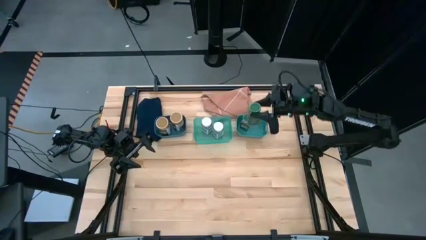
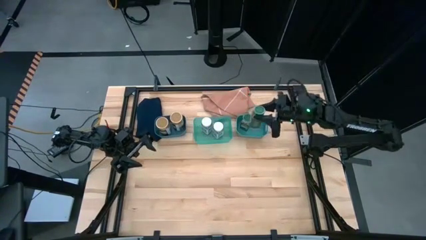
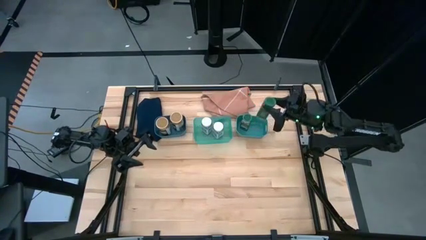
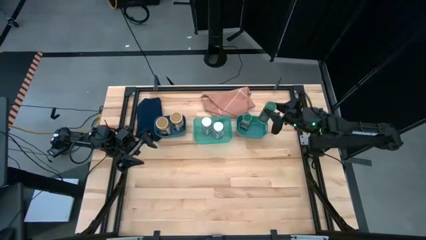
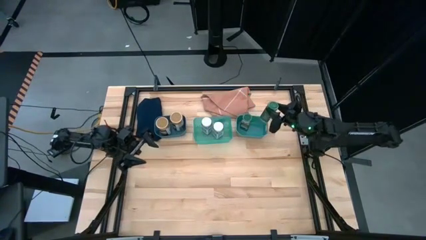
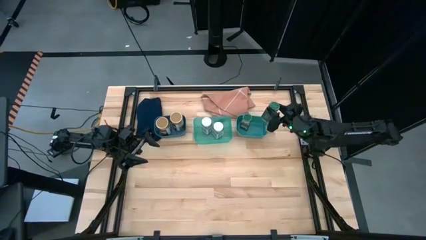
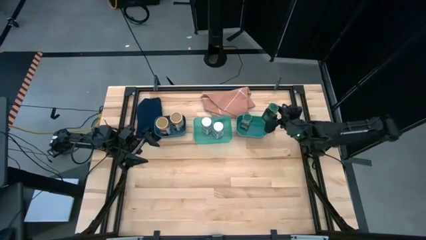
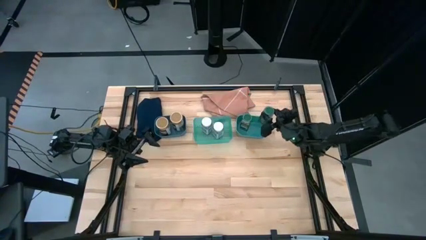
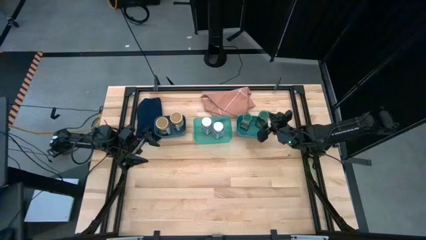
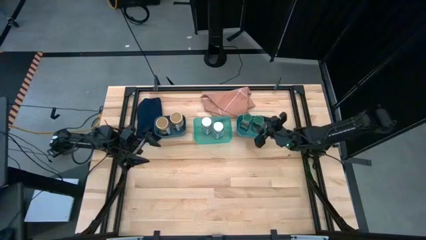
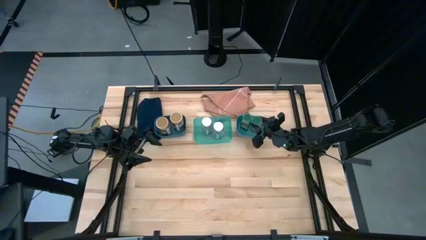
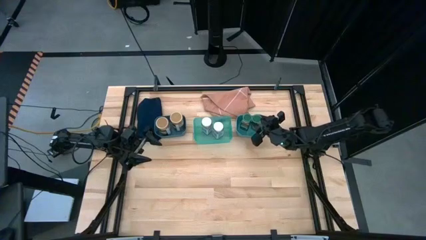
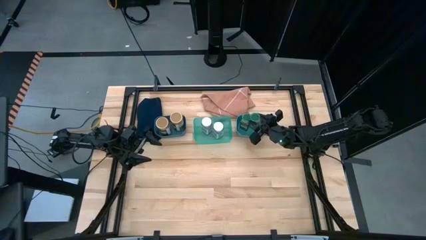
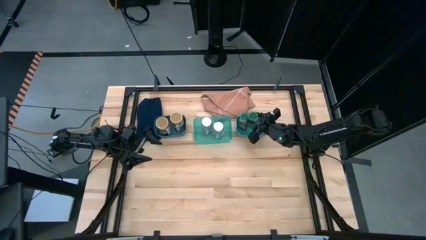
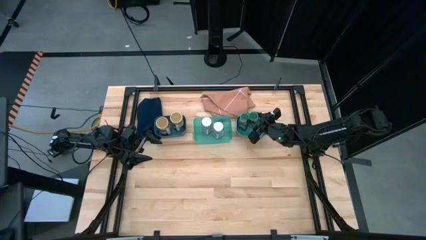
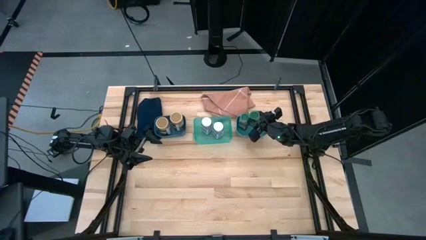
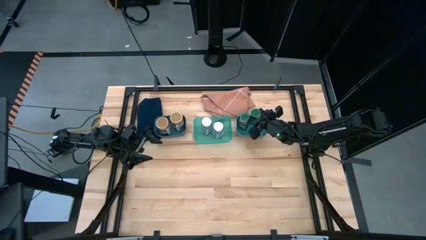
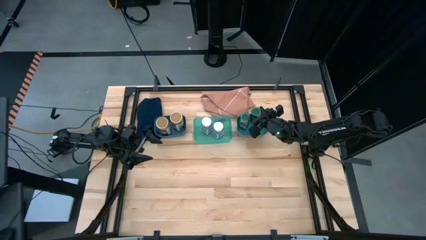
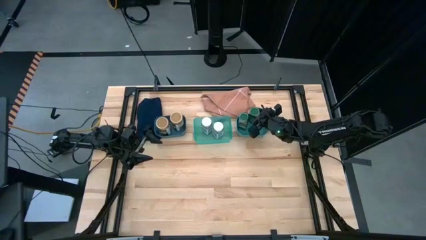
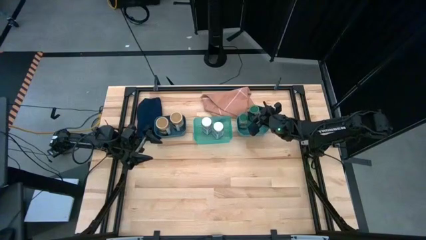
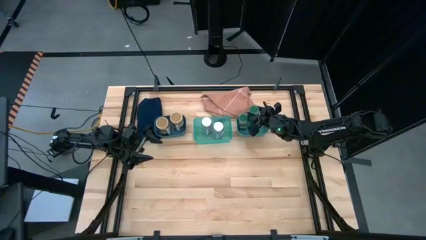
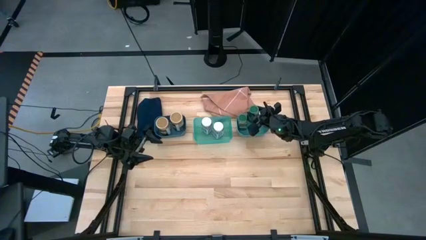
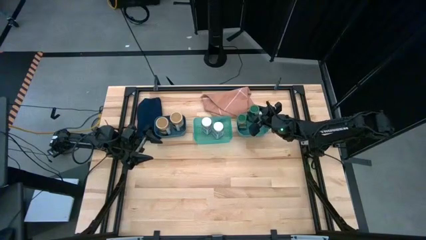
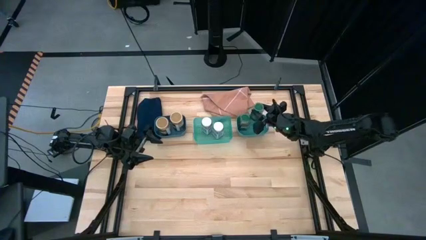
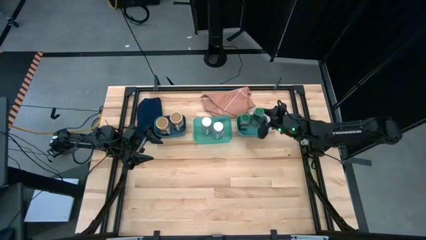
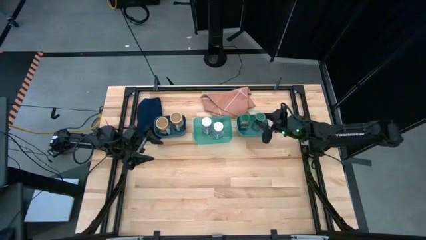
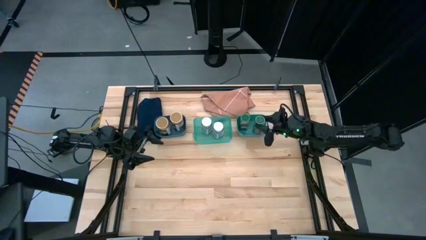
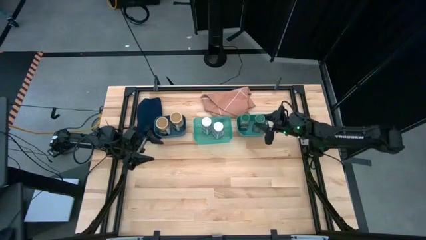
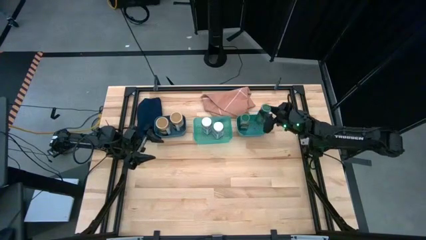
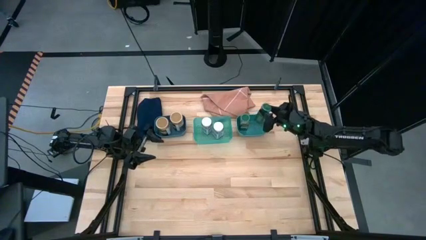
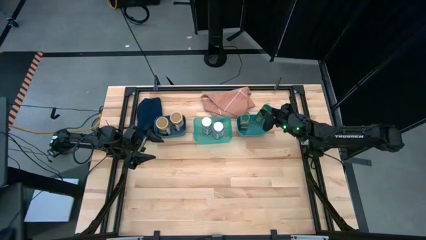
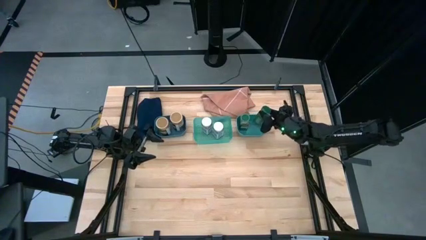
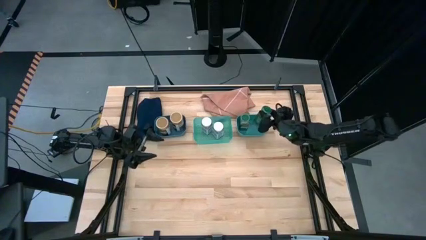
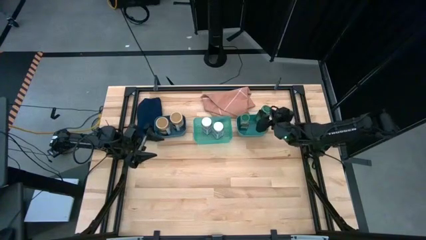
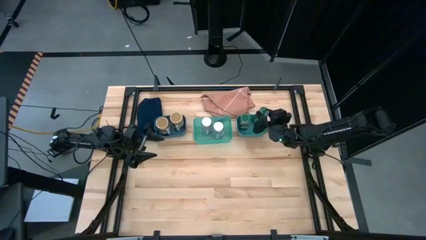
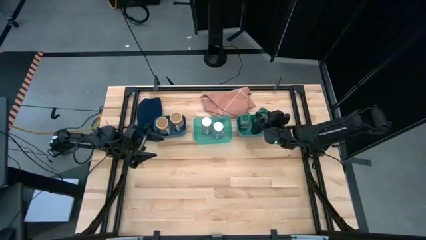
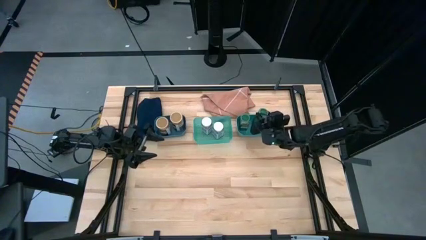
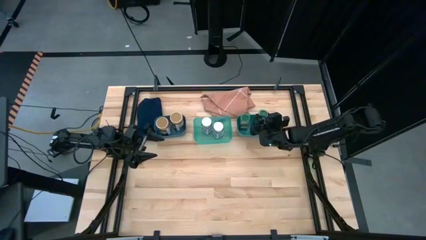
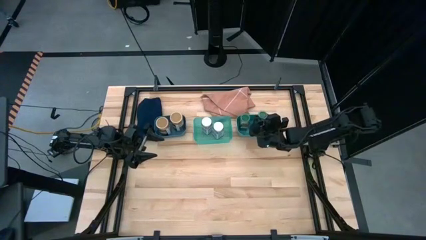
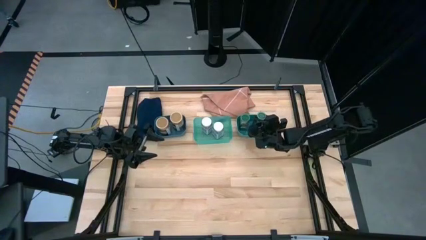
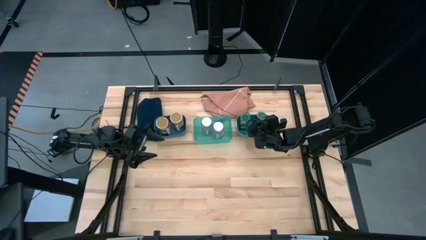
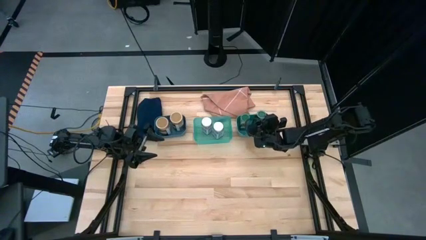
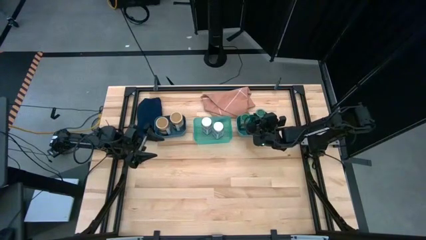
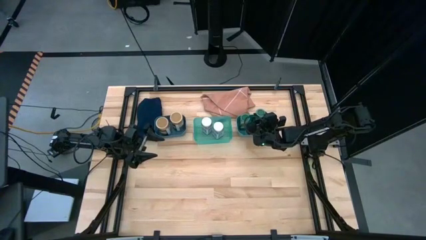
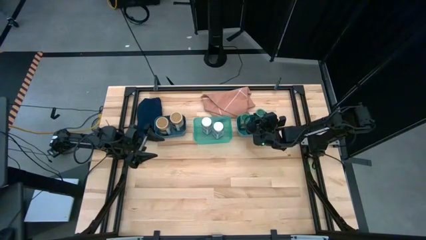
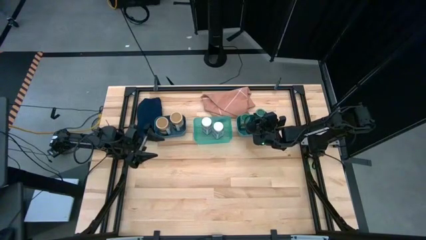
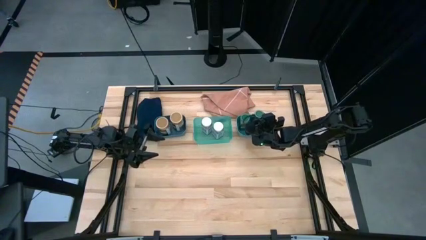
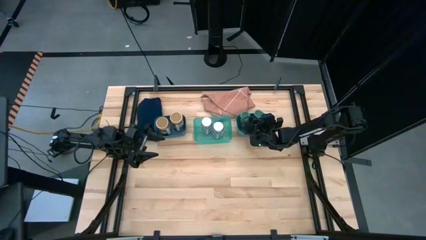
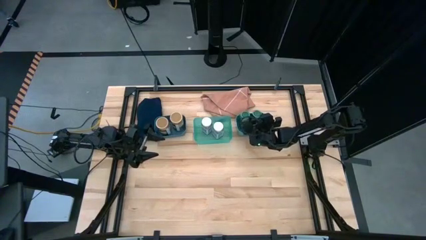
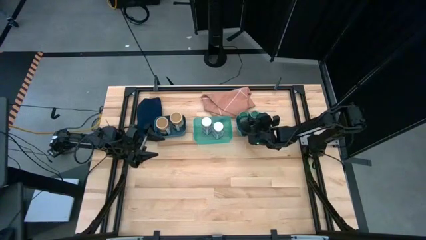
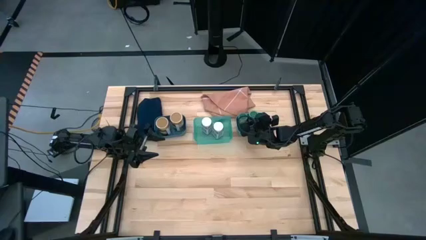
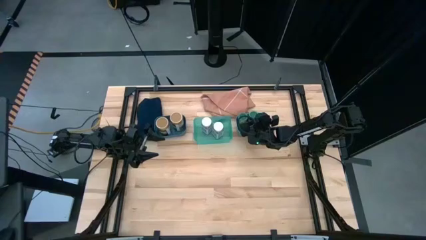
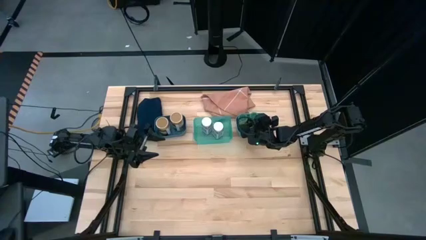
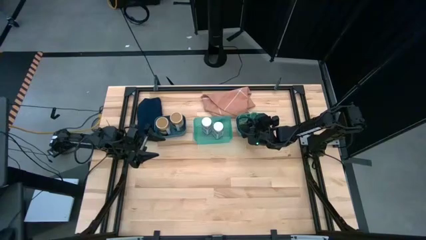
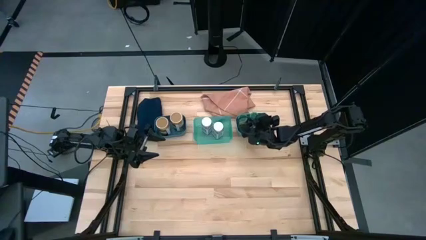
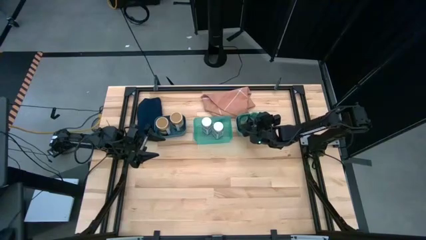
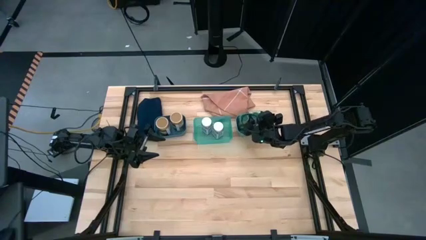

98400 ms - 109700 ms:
Task: Sort spices by type
Put the green seasoning into the light green bin
